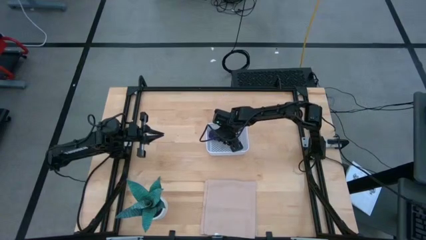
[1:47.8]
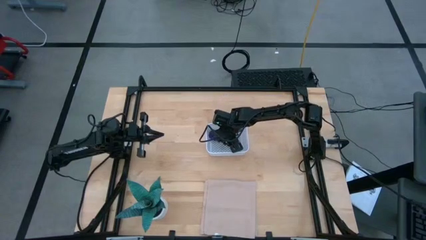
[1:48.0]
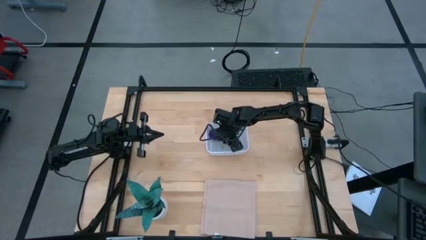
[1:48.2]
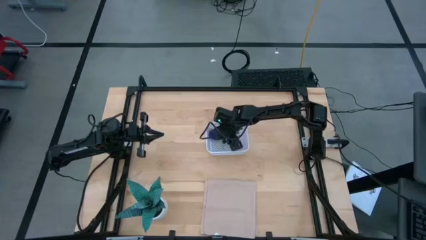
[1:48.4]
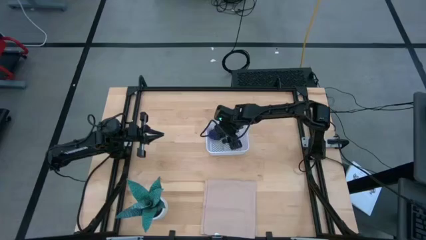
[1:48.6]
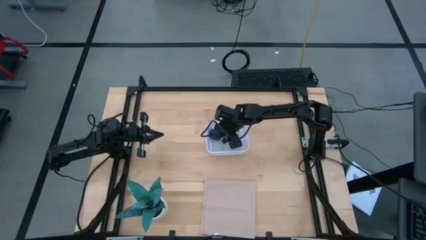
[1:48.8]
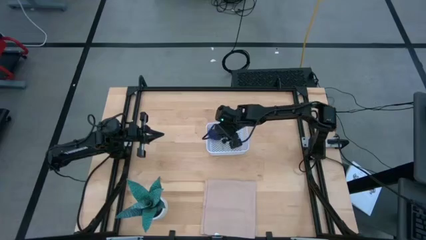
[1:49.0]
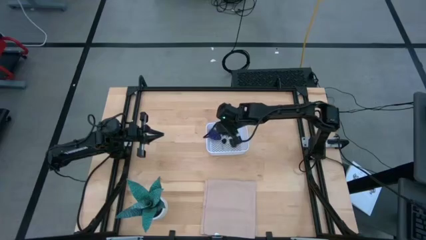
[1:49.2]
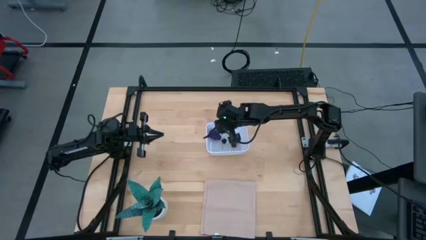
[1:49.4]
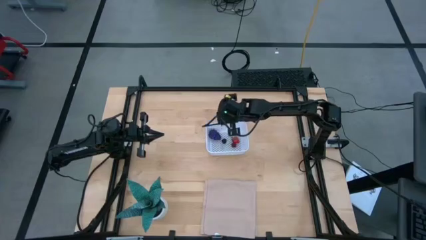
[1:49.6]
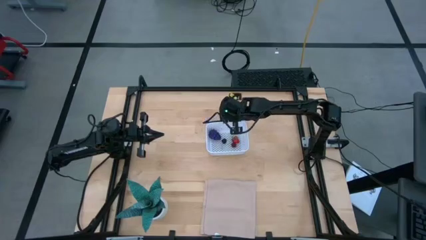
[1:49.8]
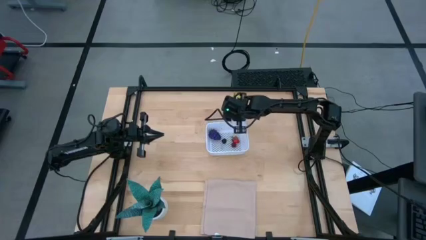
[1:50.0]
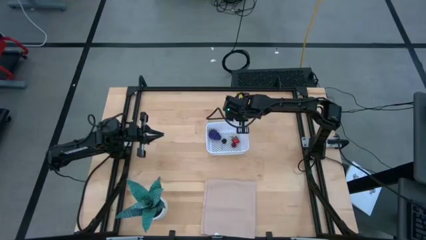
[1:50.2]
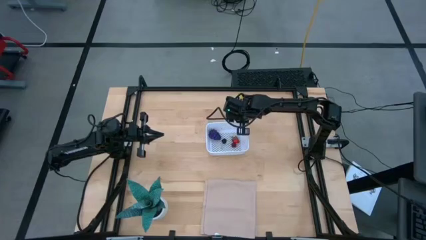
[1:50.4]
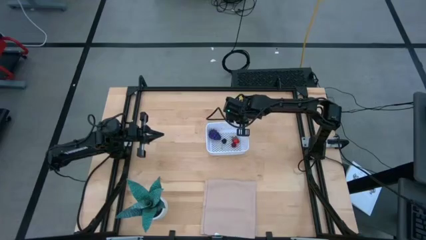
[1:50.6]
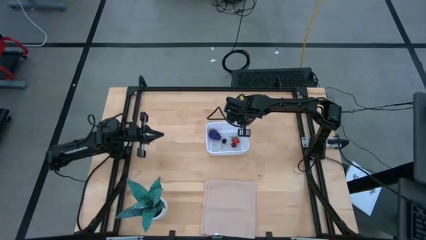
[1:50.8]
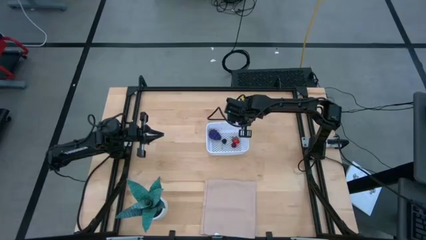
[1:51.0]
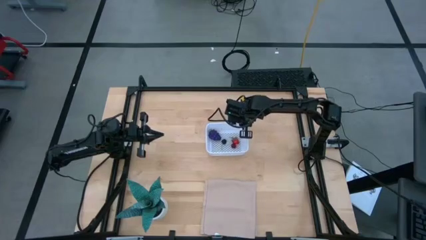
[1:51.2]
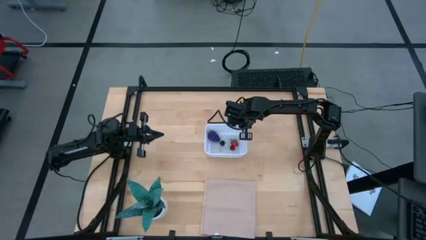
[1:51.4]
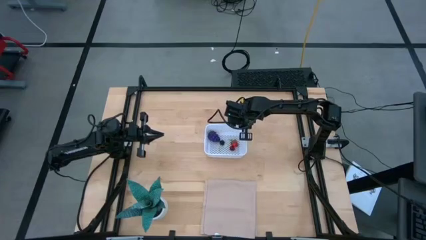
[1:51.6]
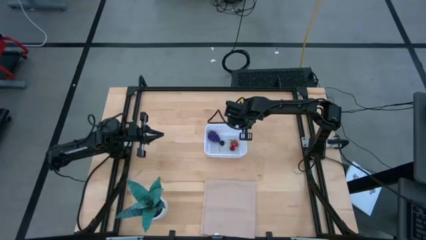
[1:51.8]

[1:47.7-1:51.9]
Task: Pick and placing Produce into tupperware
Adjust the white bin

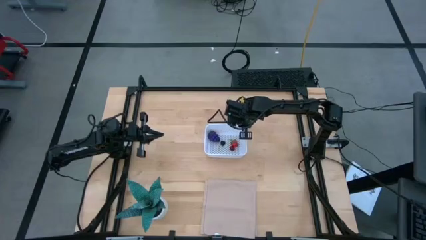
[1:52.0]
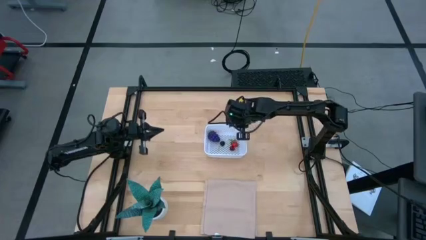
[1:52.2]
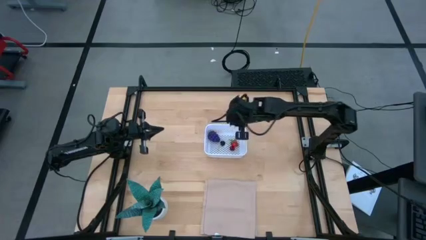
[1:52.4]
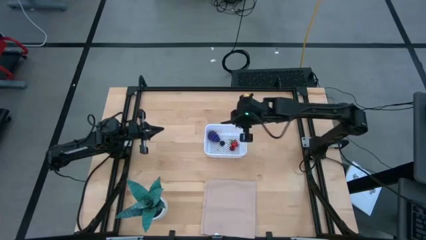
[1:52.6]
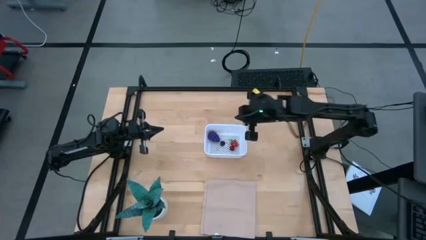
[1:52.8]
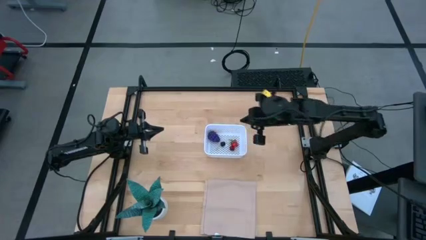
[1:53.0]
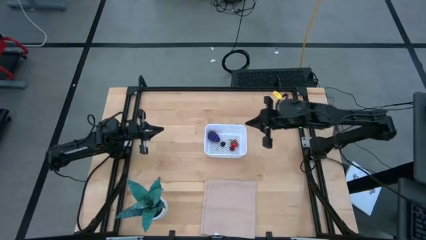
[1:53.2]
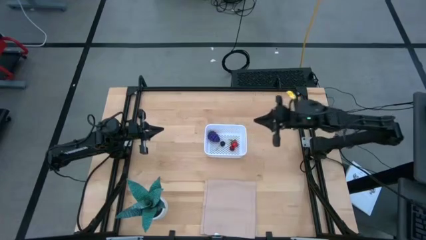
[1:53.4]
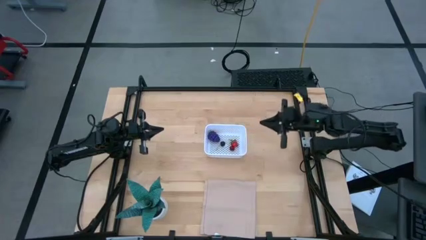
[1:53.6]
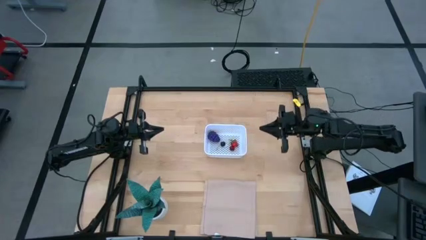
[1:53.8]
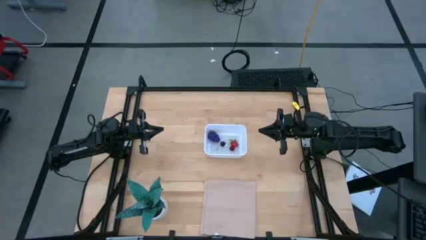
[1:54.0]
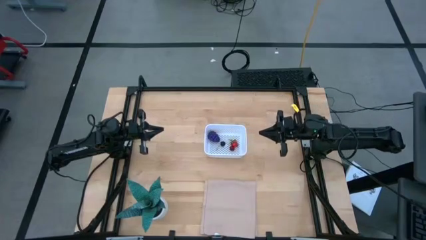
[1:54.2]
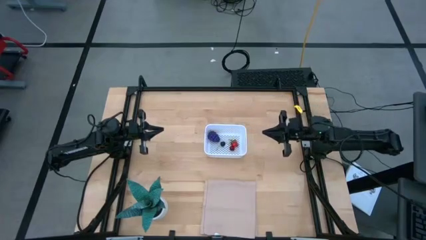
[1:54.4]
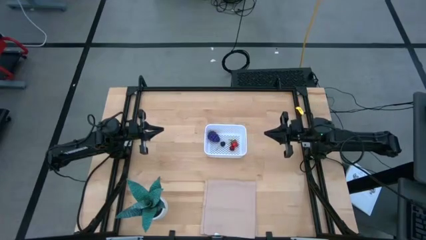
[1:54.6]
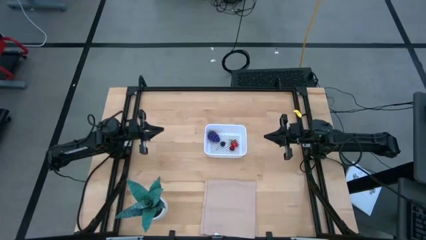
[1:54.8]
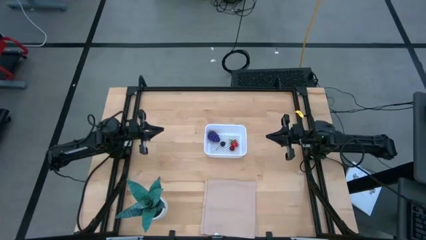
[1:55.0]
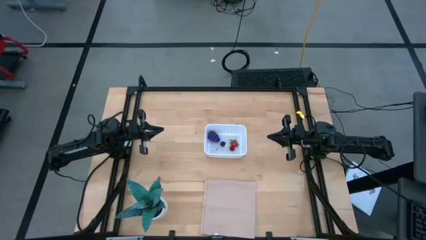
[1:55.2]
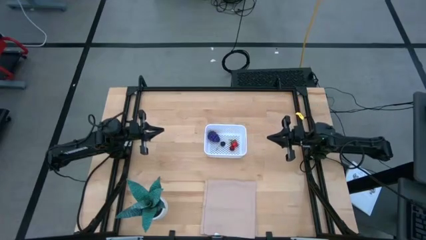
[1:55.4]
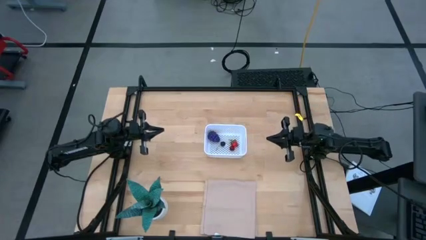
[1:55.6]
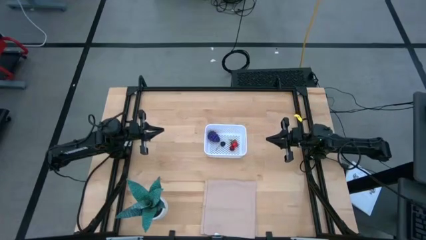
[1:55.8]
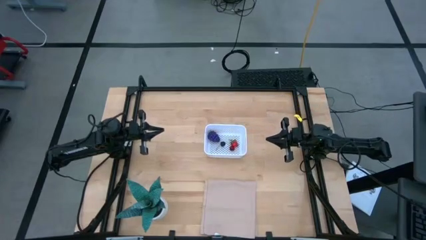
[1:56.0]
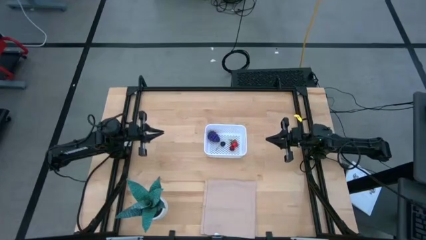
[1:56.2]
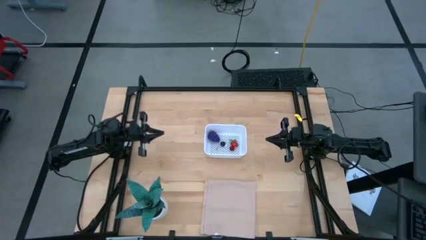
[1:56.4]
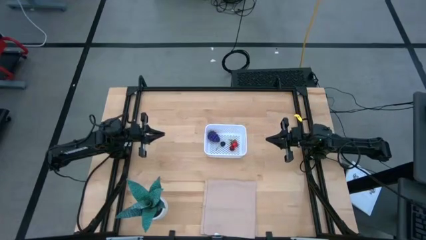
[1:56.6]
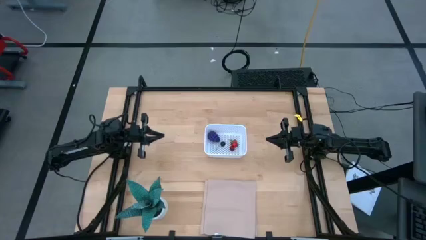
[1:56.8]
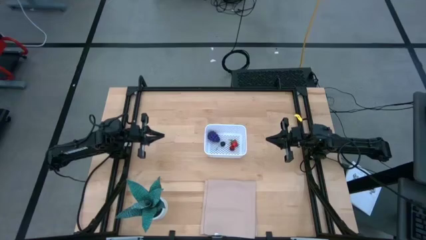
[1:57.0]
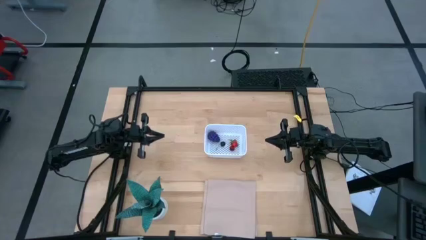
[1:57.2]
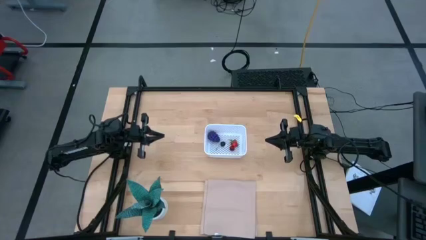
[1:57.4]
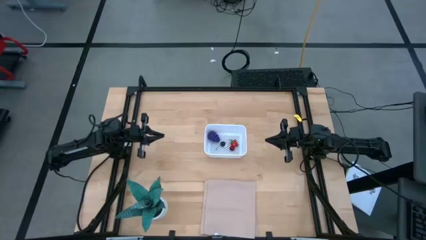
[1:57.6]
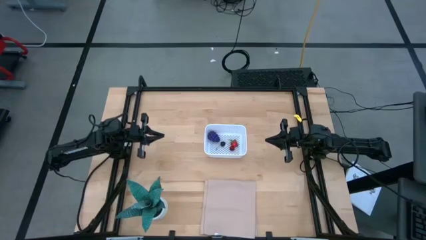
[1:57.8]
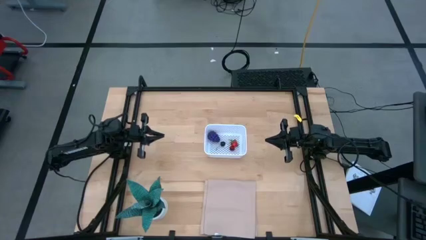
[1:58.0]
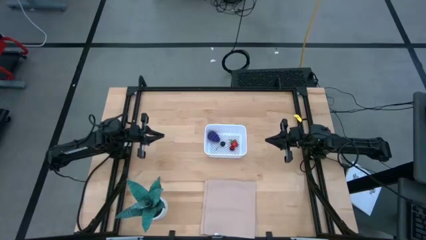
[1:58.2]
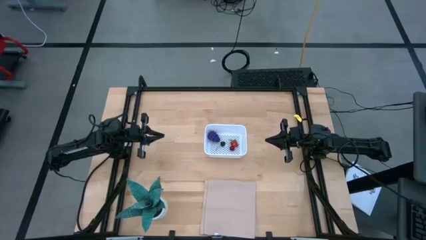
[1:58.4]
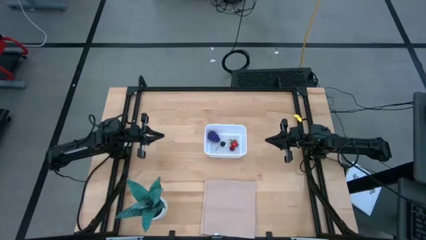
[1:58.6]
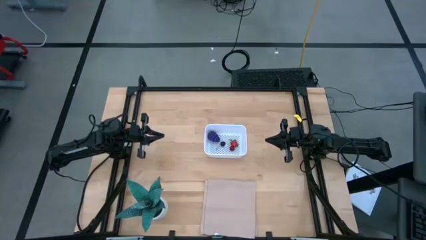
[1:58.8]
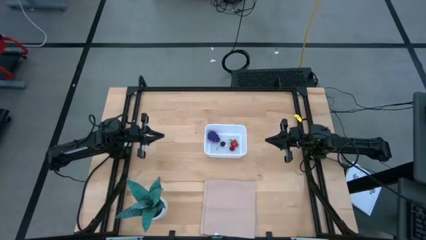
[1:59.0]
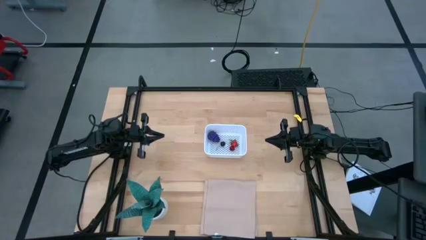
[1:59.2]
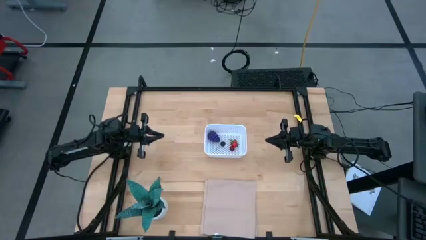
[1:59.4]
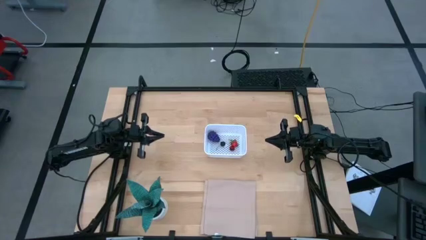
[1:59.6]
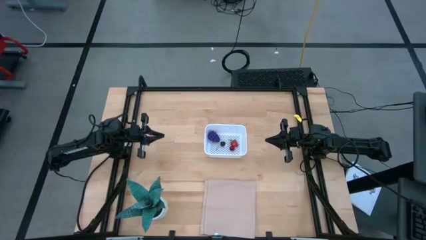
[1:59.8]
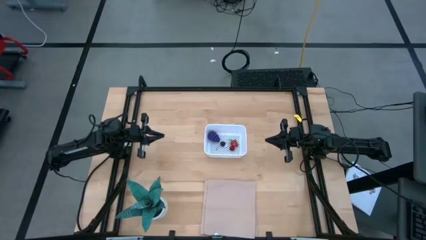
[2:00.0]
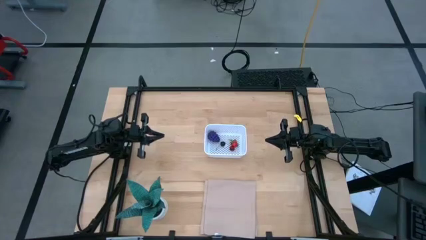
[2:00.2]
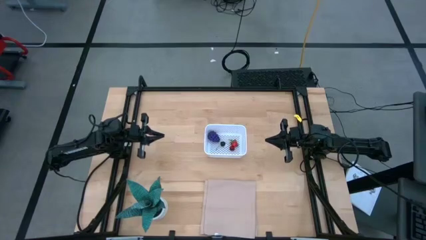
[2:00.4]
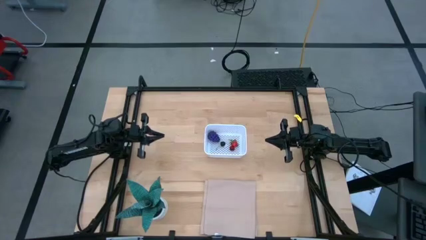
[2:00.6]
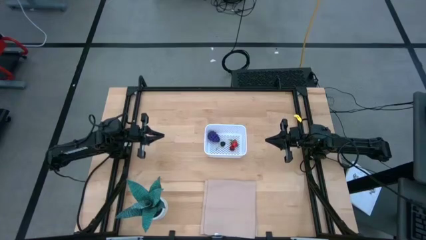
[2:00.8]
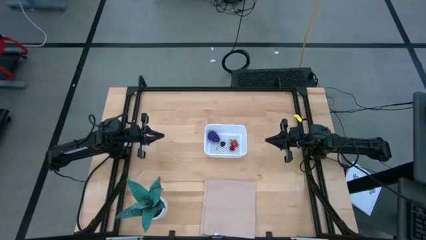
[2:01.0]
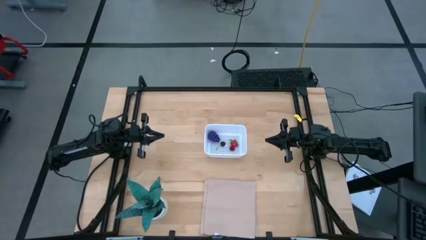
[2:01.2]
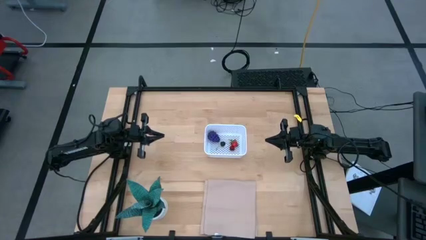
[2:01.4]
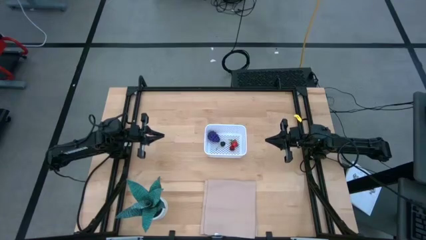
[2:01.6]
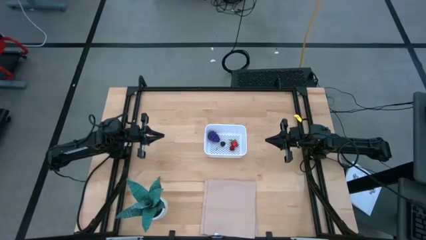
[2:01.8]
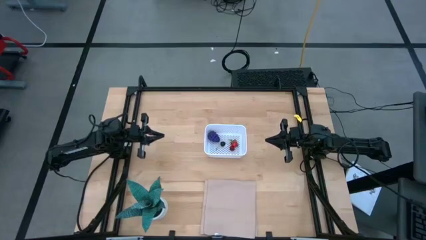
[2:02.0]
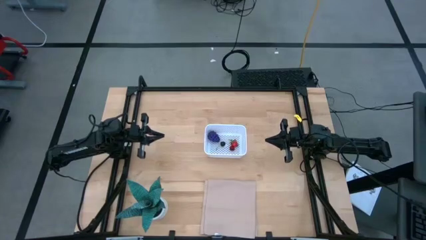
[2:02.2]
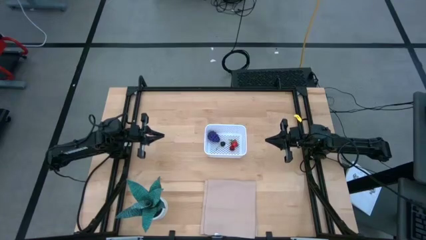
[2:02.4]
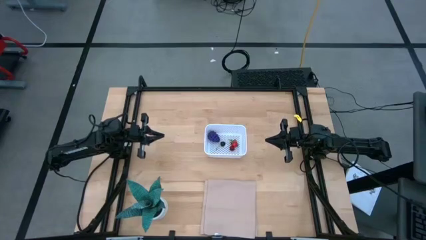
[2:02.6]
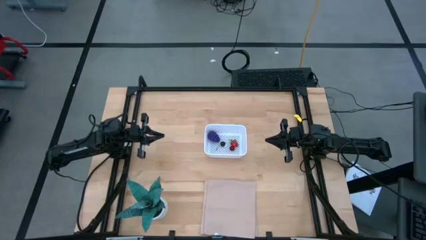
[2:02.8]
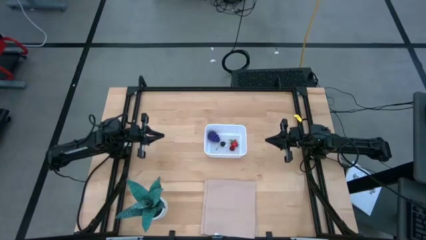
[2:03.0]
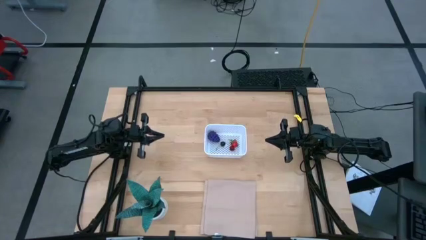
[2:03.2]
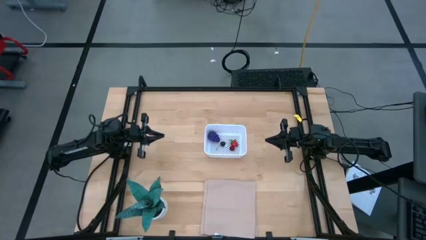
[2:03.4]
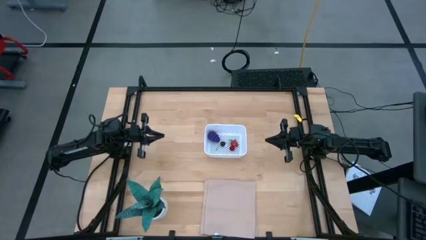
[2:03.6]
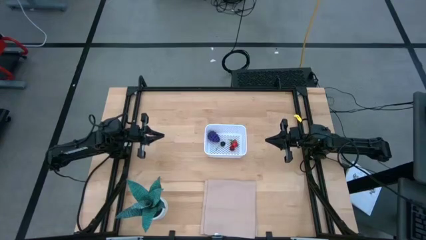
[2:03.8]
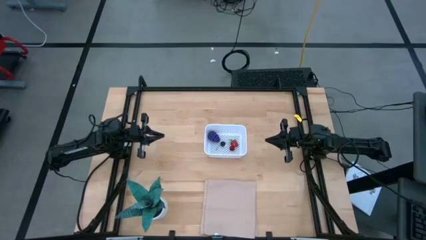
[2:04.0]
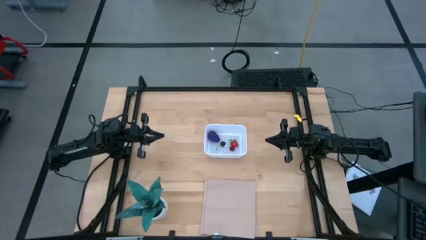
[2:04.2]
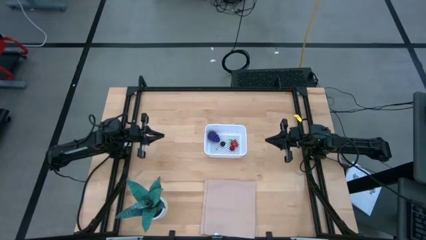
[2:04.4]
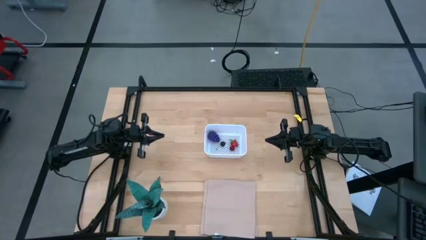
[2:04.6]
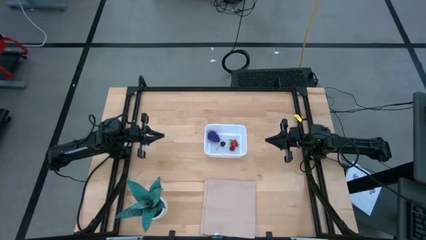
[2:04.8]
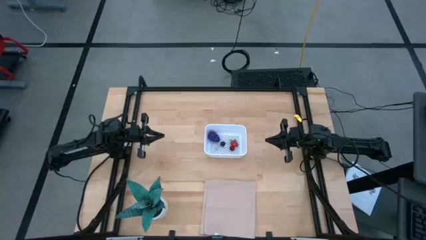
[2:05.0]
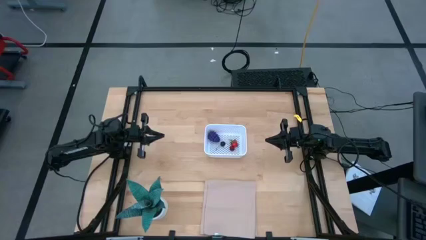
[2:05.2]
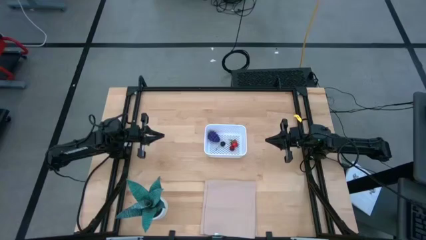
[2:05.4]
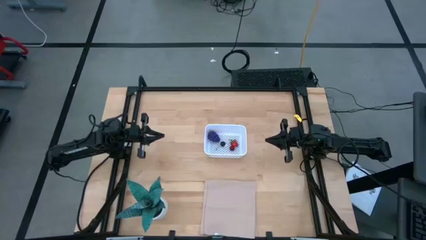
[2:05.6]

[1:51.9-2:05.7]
Return to Home Position
